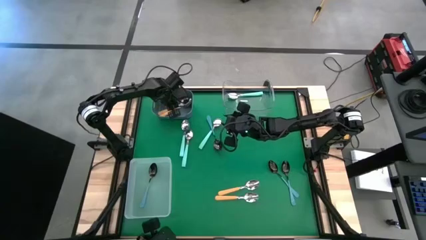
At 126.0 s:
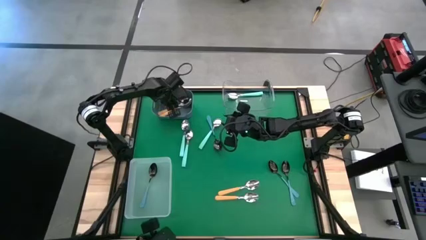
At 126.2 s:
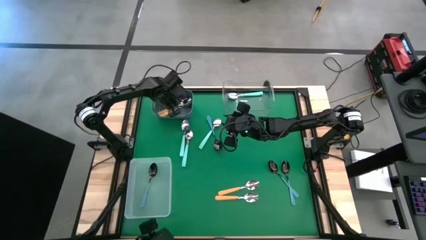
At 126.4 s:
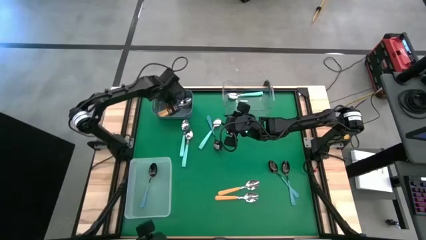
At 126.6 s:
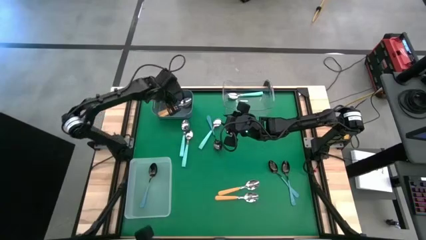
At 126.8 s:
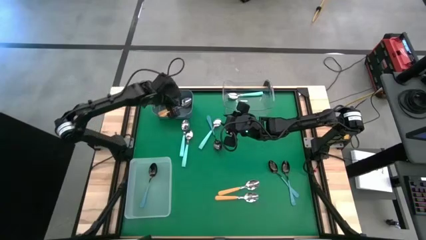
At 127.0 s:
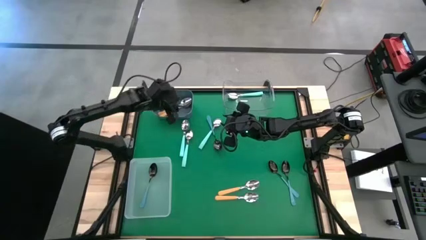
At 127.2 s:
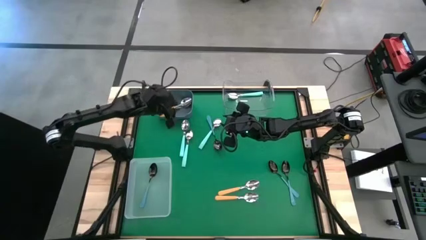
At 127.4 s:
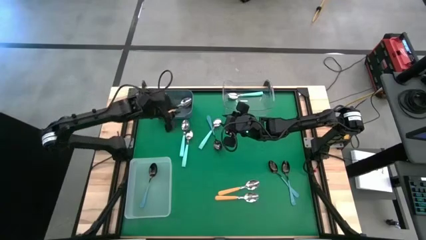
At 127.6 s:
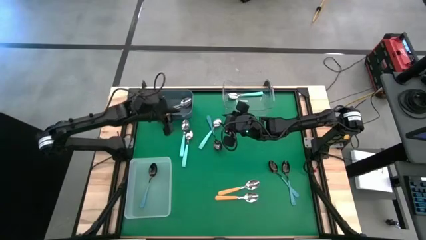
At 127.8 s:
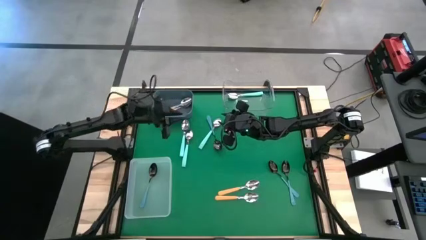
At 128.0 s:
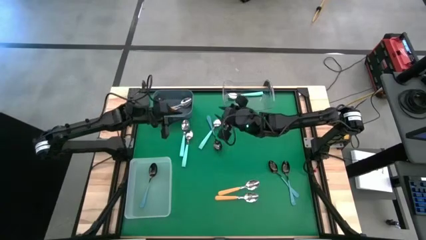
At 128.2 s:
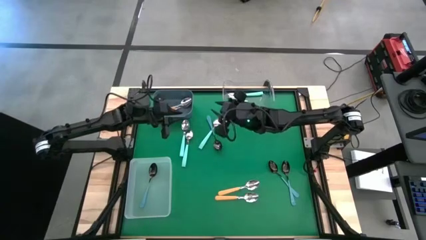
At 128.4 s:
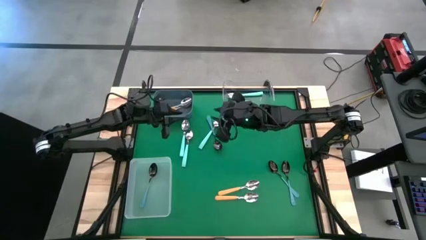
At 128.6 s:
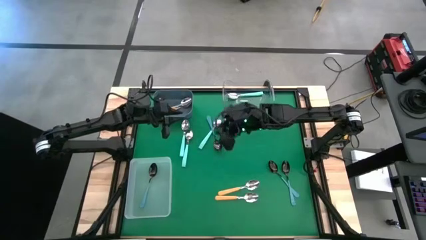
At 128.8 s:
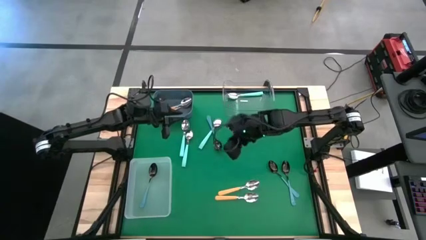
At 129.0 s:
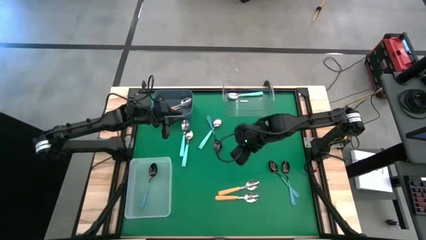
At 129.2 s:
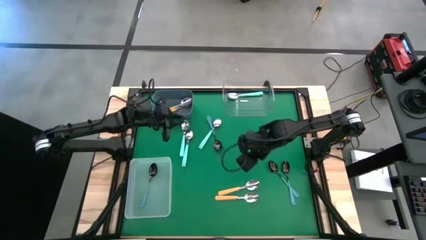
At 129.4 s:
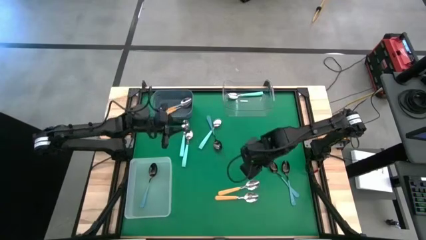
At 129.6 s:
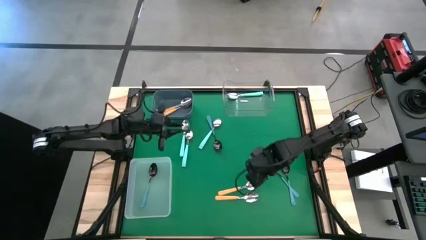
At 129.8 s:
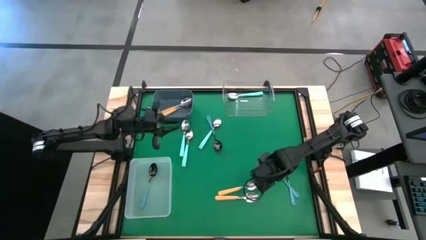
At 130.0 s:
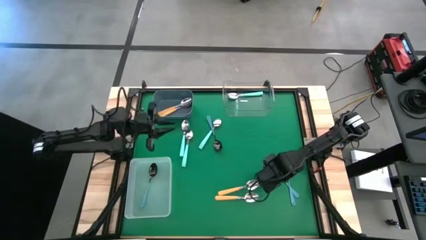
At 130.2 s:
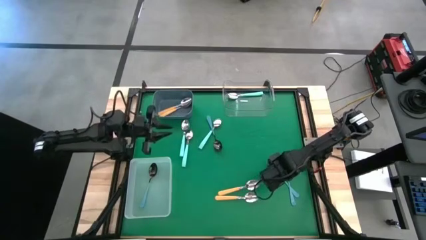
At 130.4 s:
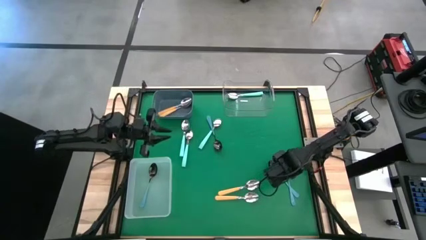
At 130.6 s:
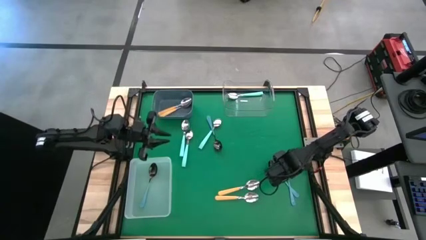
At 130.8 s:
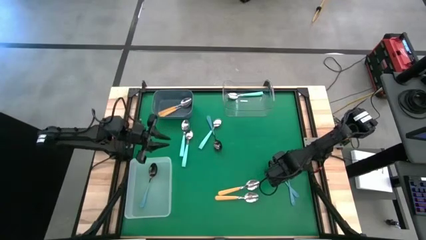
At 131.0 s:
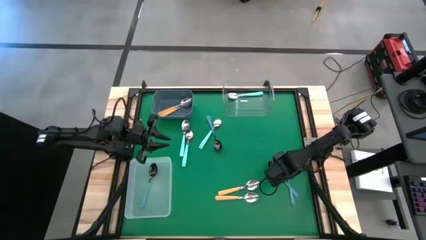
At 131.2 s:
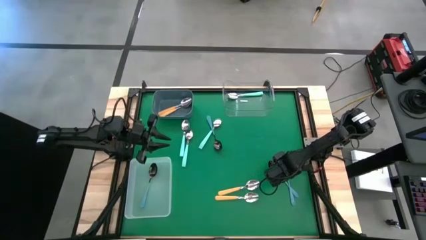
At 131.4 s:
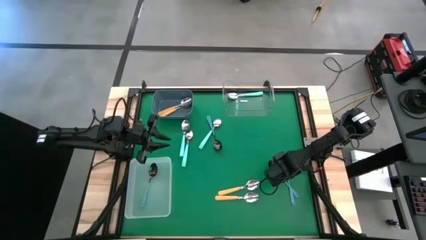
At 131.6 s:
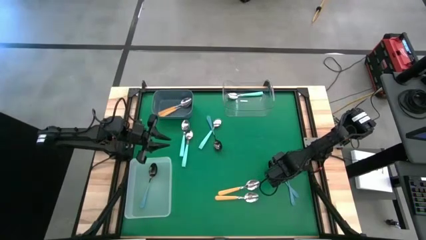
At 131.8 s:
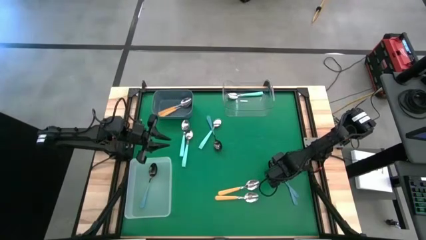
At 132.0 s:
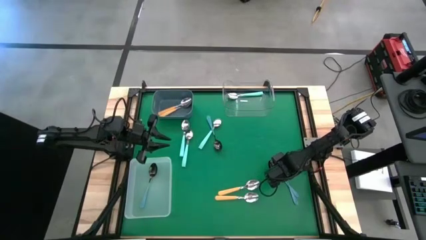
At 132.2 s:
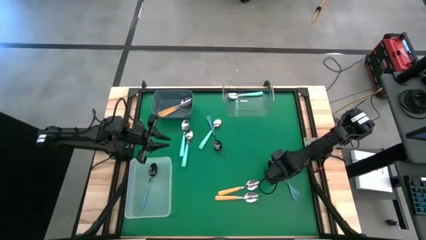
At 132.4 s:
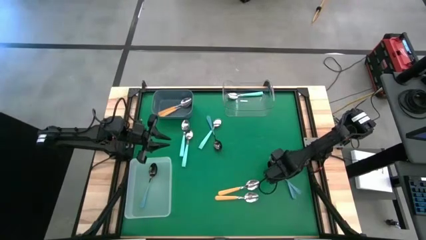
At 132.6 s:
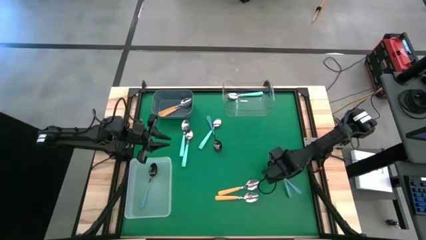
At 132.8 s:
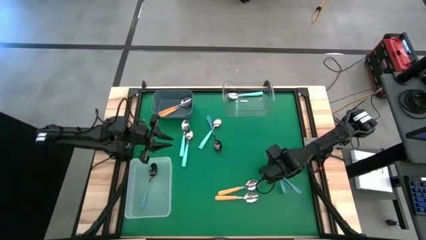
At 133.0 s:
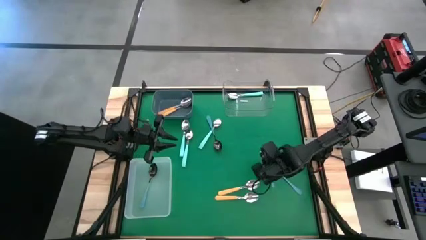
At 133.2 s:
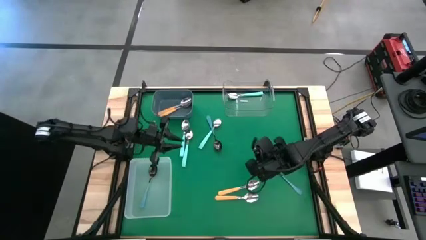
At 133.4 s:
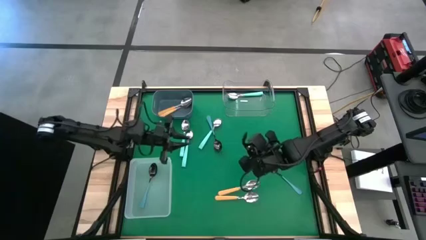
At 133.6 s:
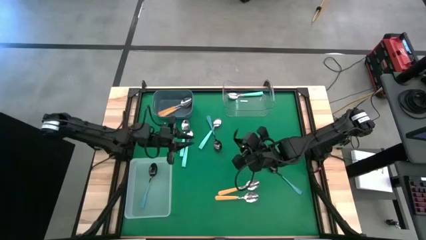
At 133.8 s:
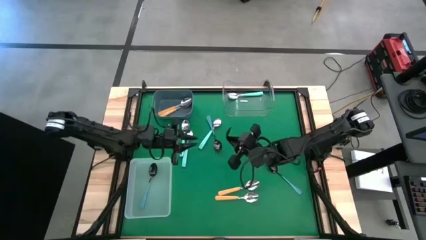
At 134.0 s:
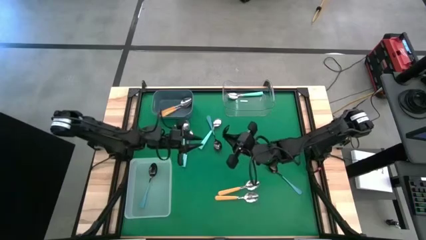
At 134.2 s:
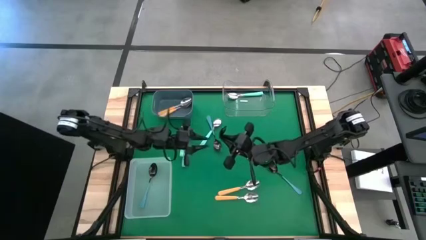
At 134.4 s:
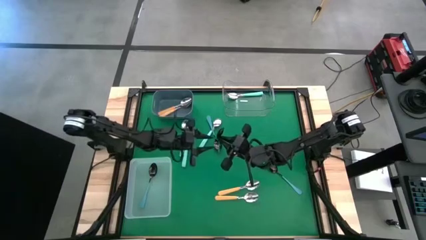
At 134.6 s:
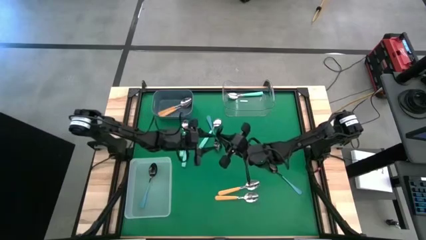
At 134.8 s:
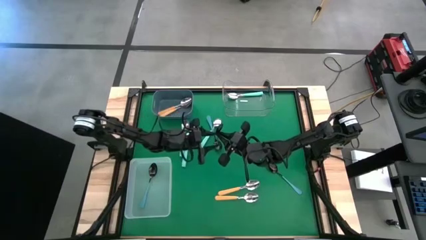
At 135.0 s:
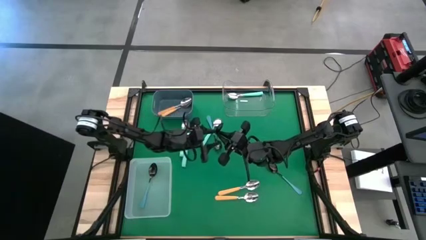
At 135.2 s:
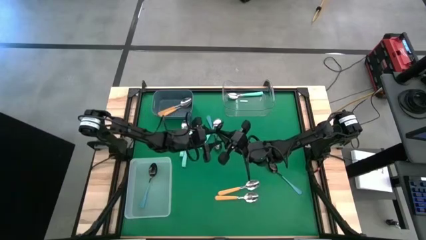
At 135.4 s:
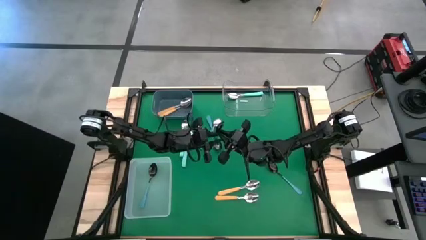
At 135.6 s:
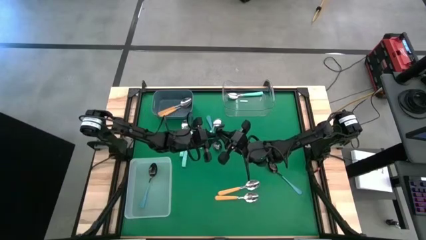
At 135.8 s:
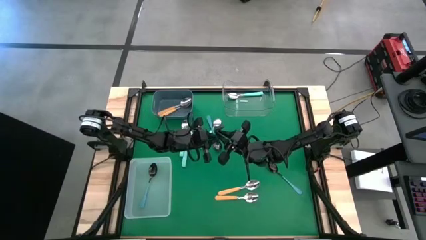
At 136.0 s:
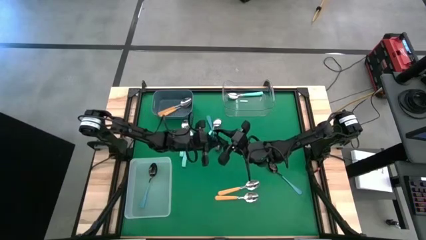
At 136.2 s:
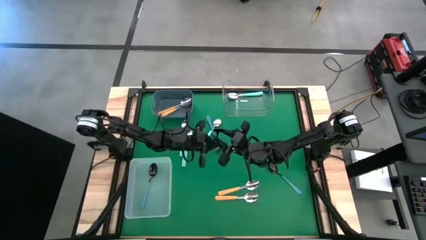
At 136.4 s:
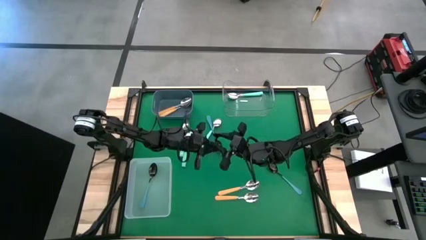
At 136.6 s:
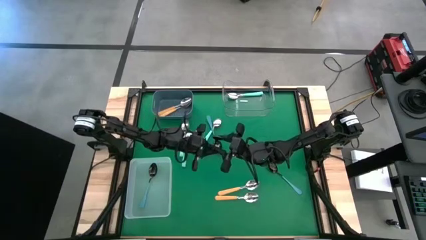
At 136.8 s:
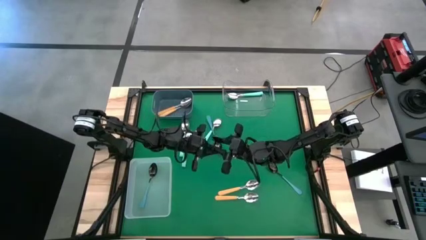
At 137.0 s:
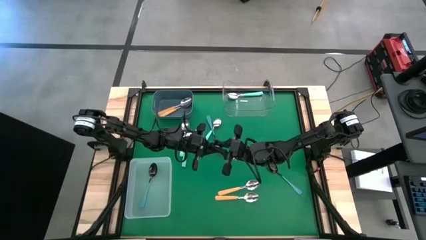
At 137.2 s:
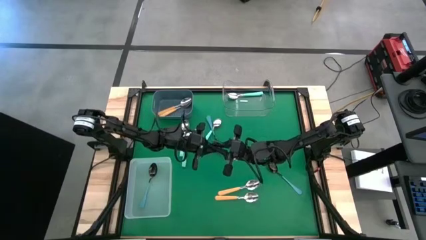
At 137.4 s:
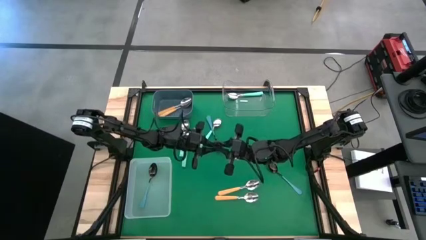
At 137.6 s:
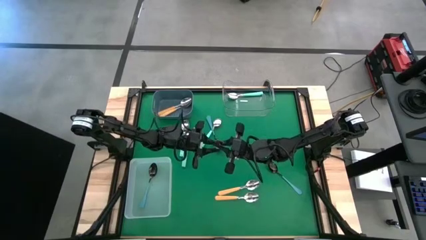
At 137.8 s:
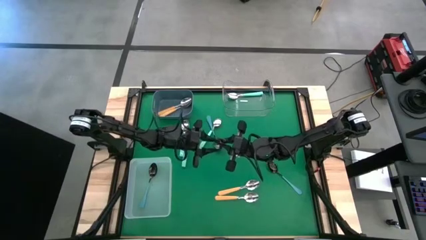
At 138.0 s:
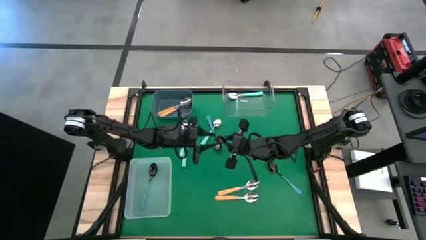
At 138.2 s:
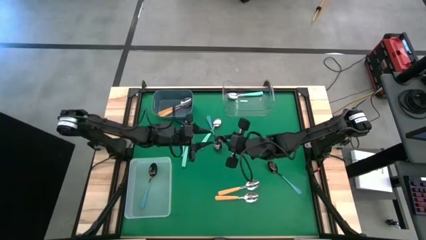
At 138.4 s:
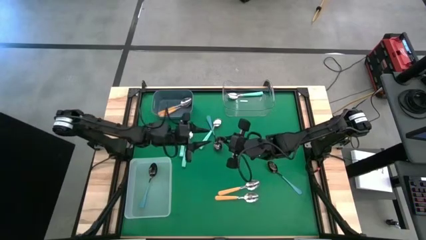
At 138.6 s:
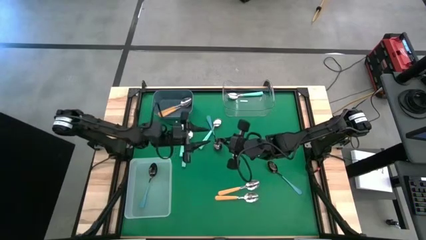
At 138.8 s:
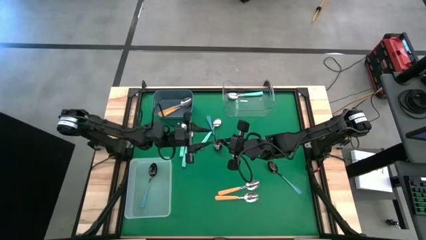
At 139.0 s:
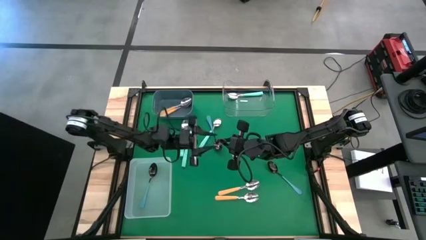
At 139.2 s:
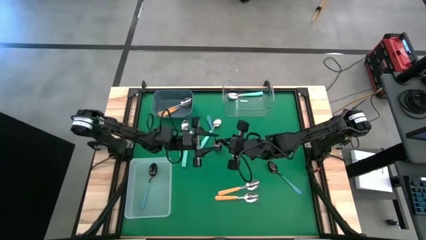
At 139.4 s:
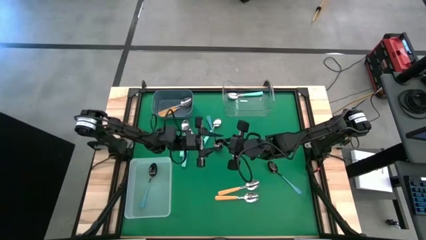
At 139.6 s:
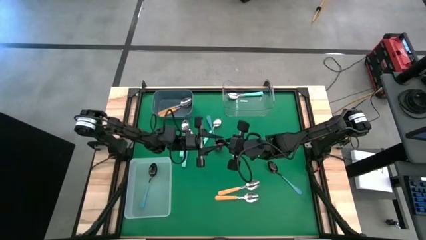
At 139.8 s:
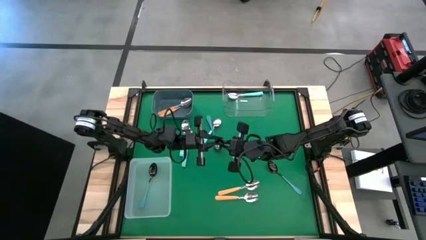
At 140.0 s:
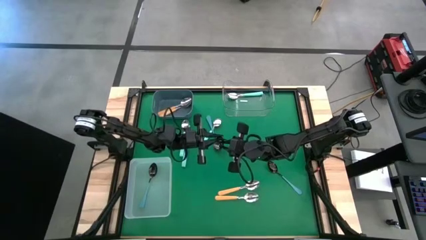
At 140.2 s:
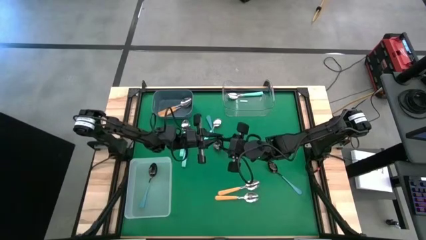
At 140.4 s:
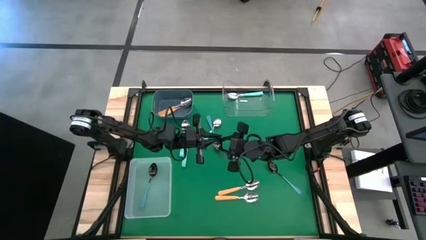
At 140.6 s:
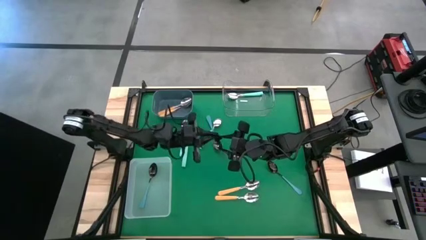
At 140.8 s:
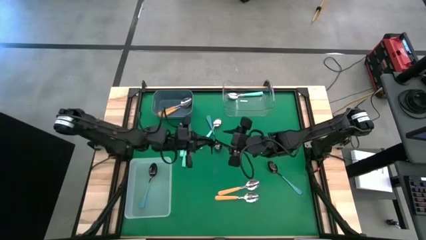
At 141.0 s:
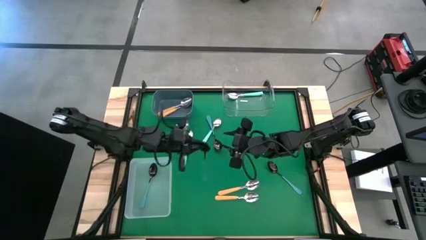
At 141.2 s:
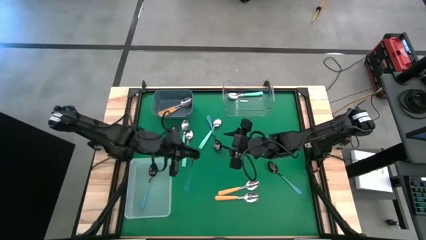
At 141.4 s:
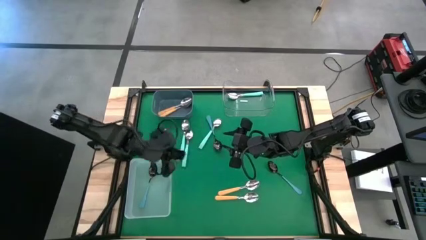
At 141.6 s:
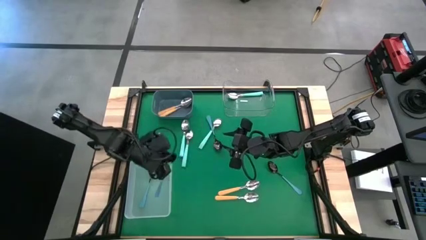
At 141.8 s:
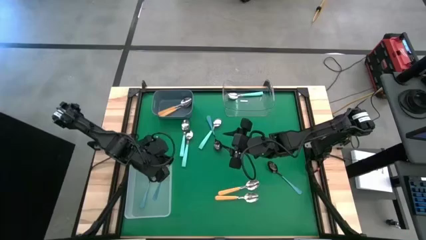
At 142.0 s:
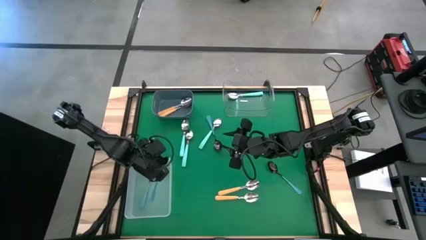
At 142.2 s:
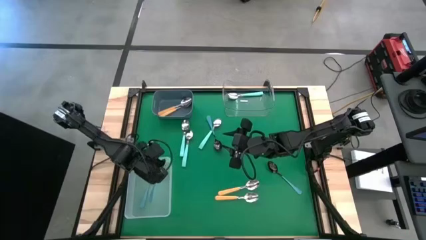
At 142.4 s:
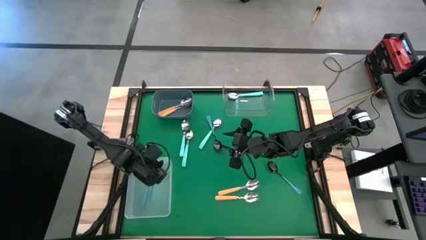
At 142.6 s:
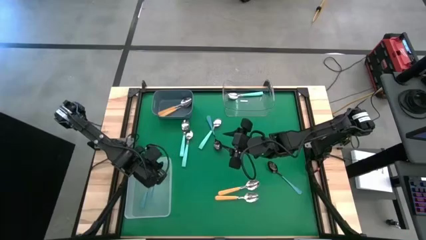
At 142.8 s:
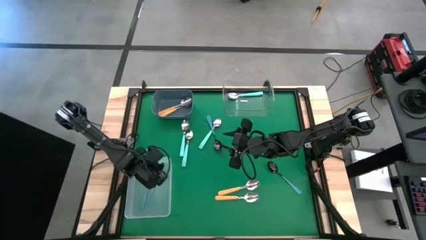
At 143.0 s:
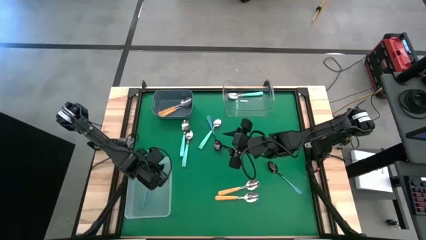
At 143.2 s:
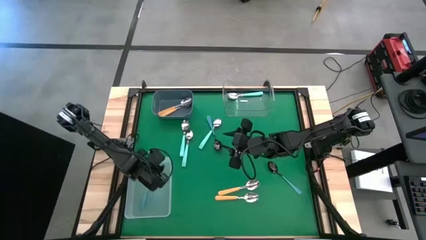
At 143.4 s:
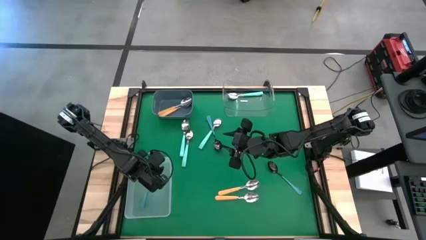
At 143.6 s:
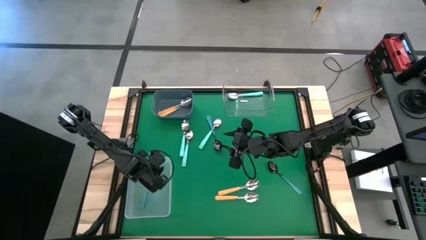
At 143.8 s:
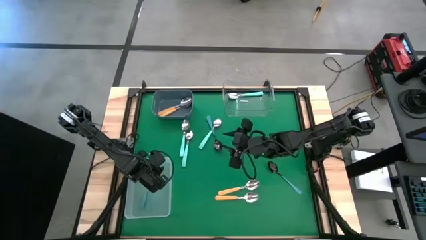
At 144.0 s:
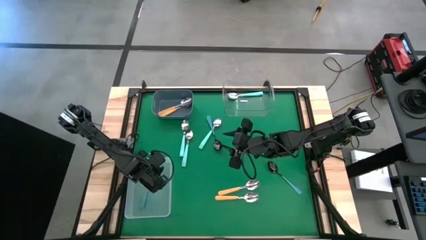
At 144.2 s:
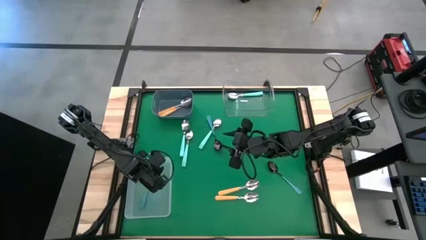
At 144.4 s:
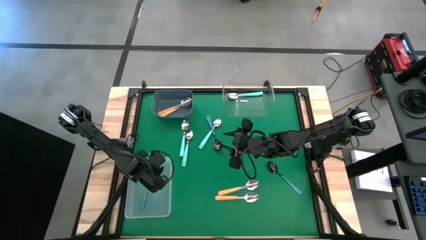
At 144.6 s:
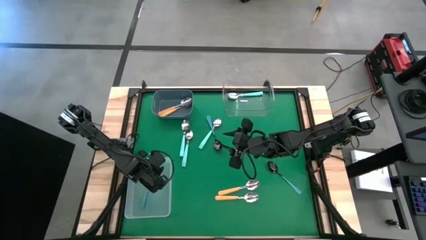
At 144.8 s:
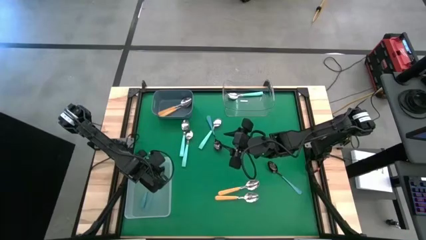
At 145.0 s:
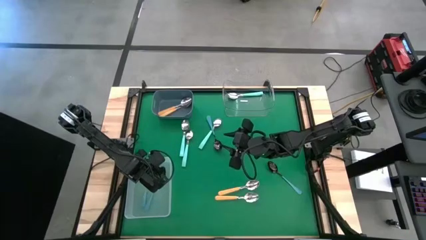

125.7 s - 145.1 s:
Task: Sort silverware by color (type)
Put the bottom dark blue spoon into the white bin
